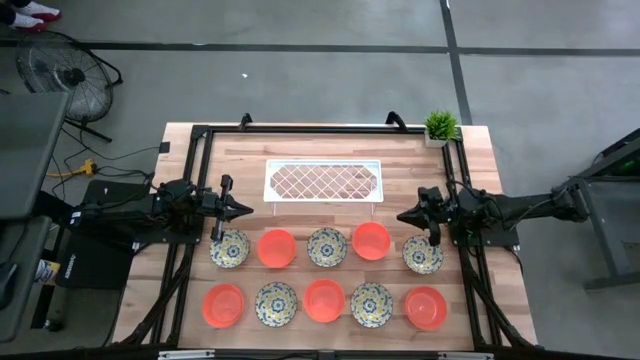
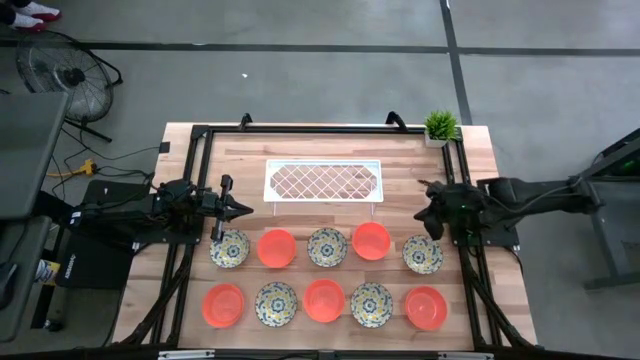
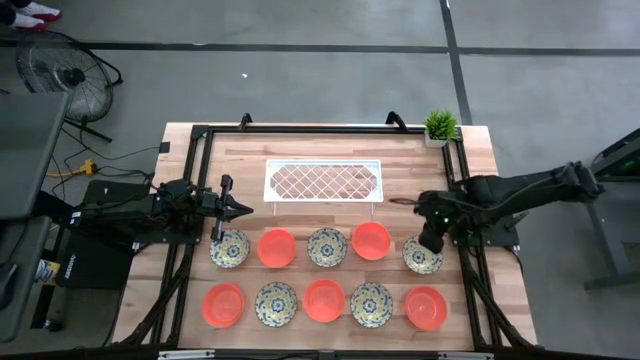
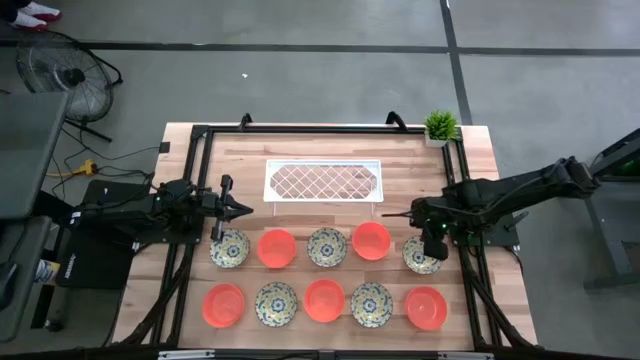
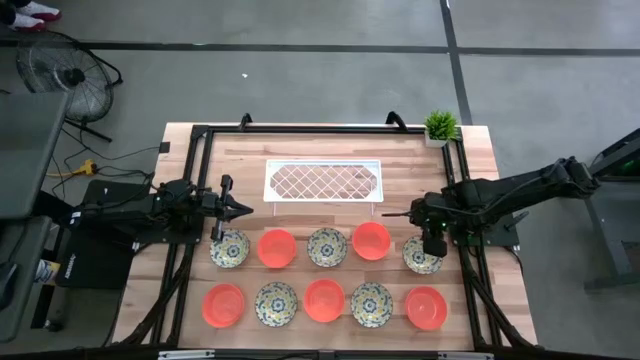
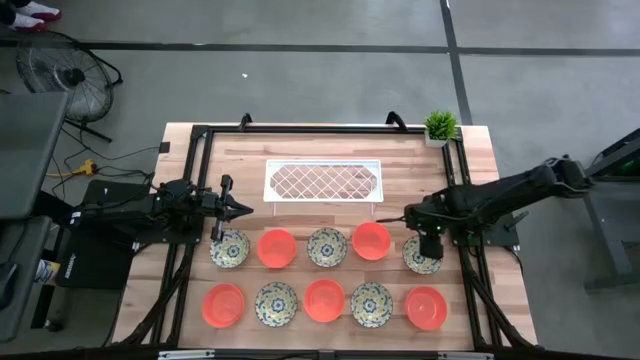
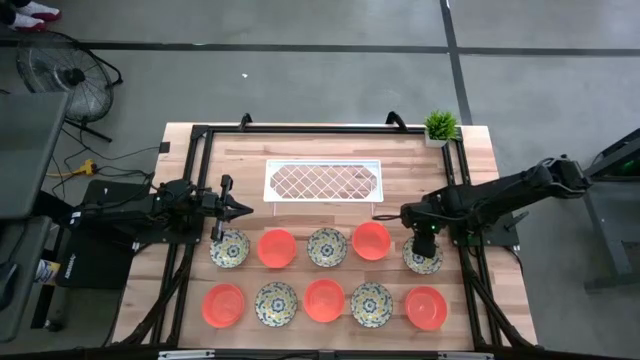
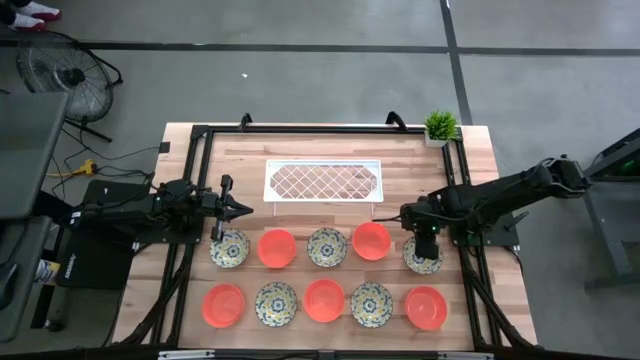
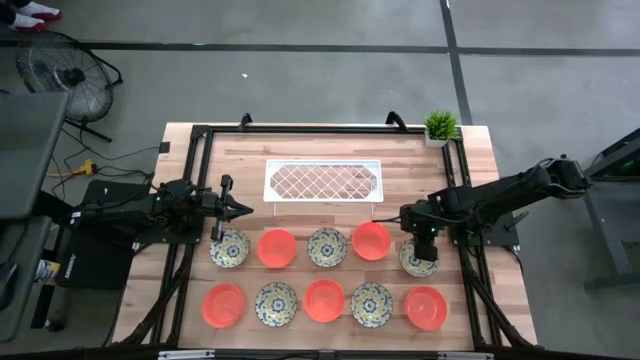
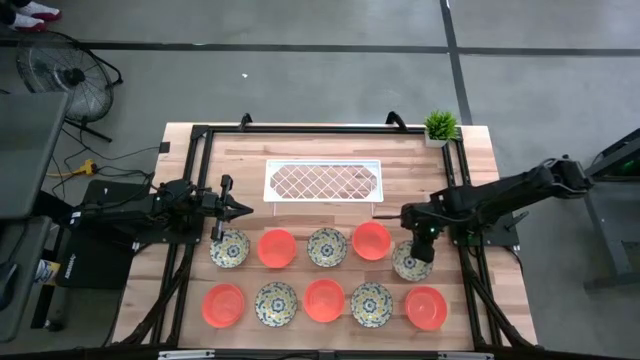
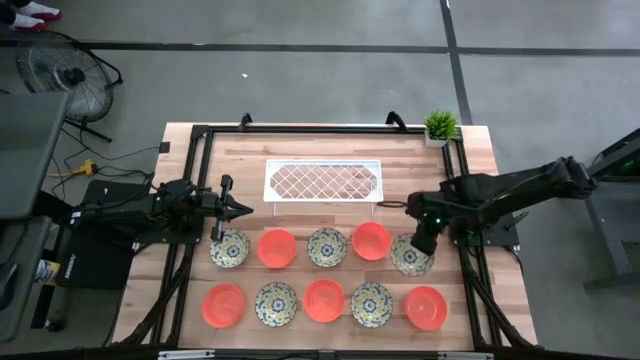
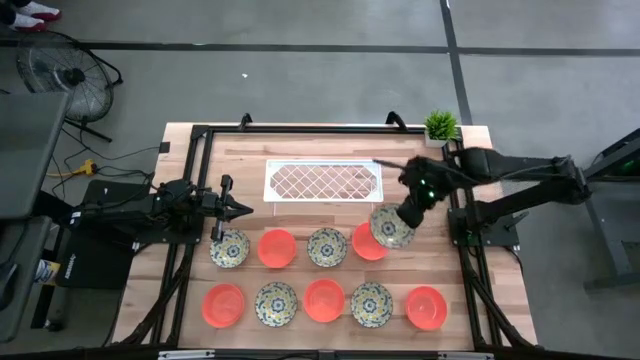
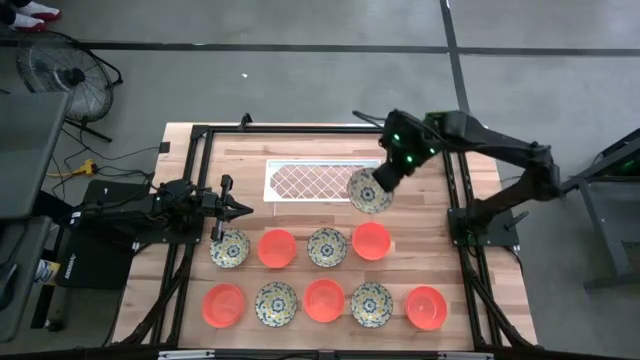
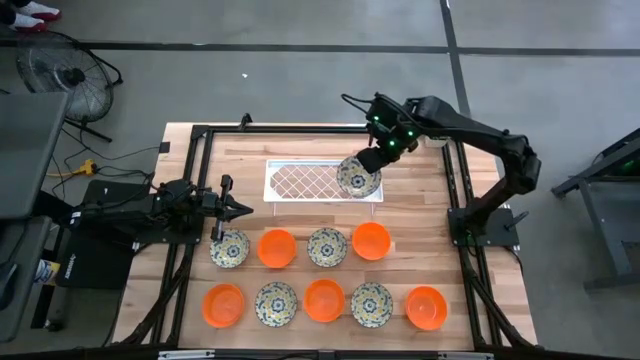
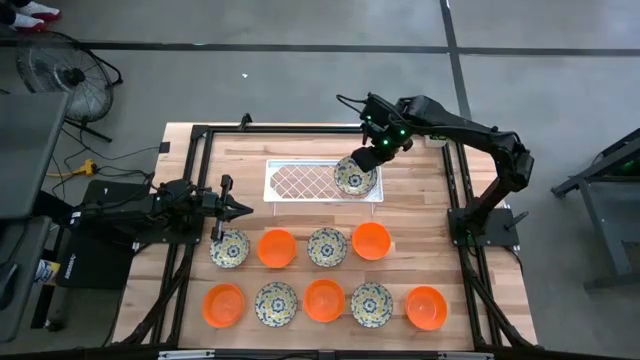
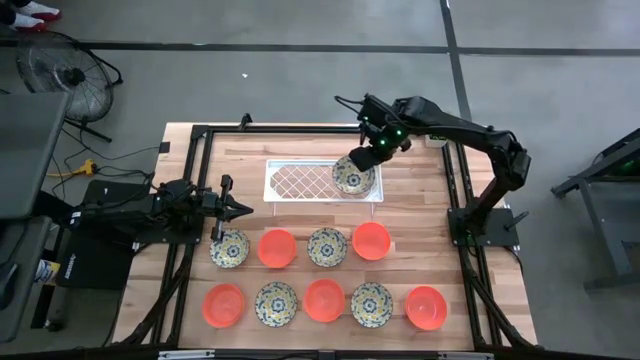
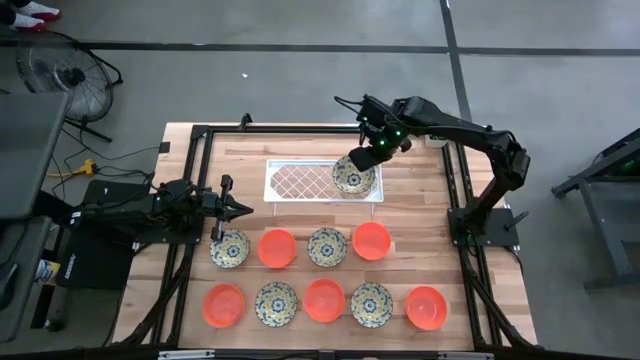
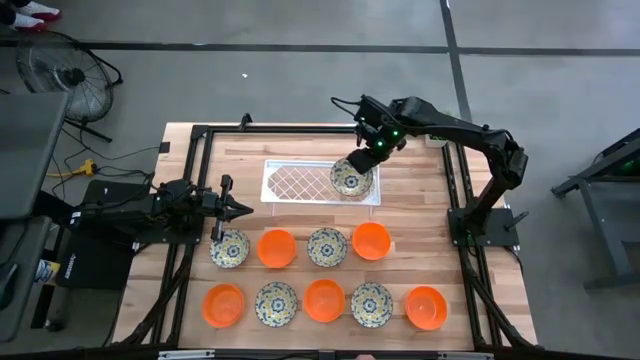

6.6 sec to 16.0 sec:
Task: Pick & Place Mini bowls
Put the yellow patterned bowl on the shelf

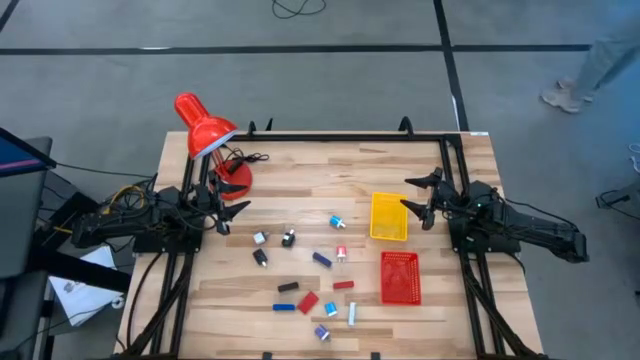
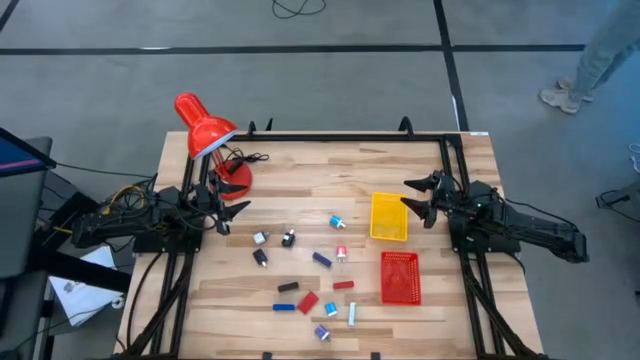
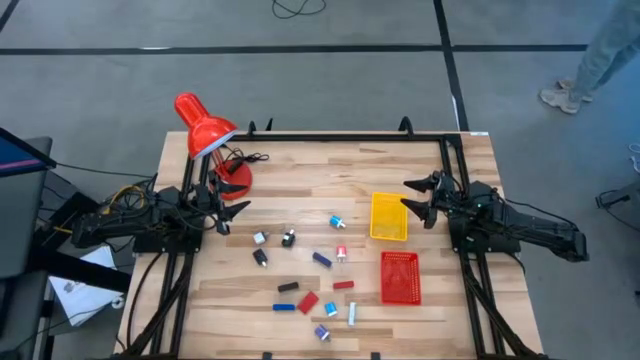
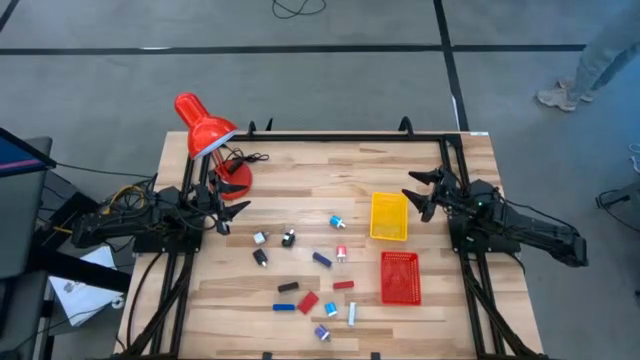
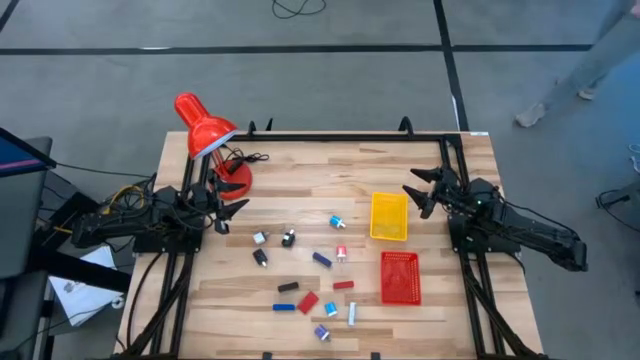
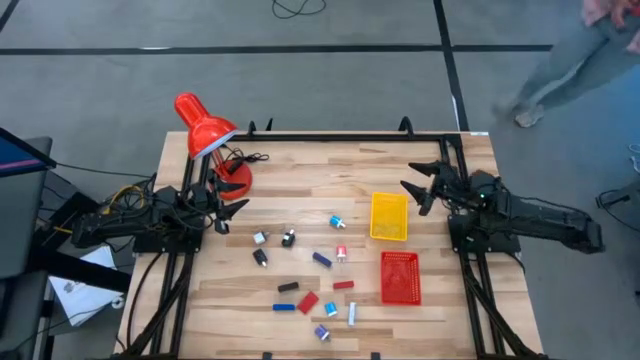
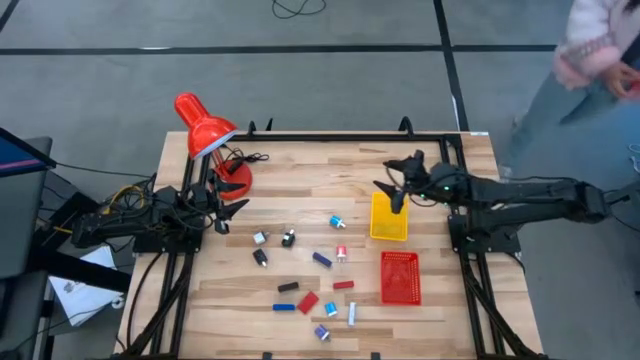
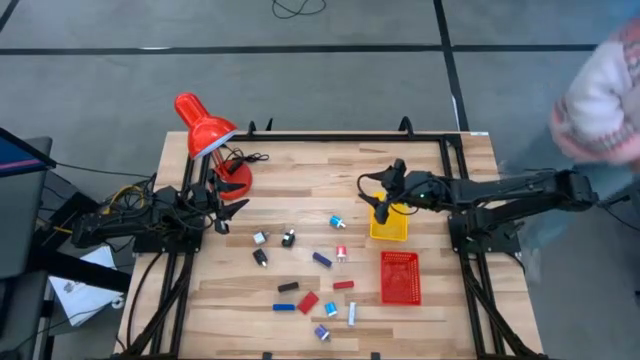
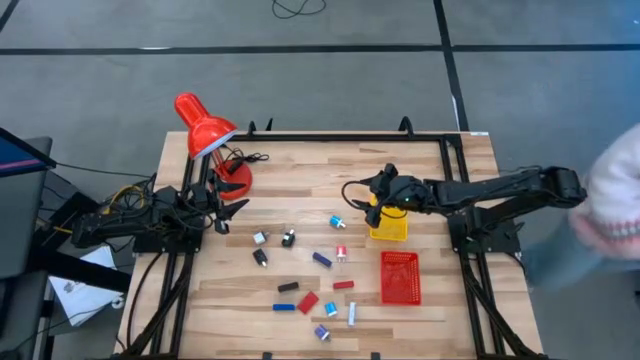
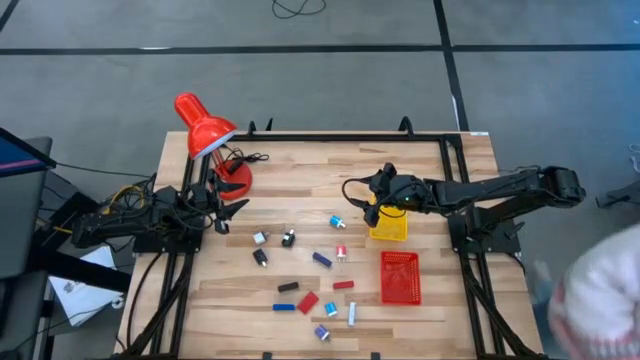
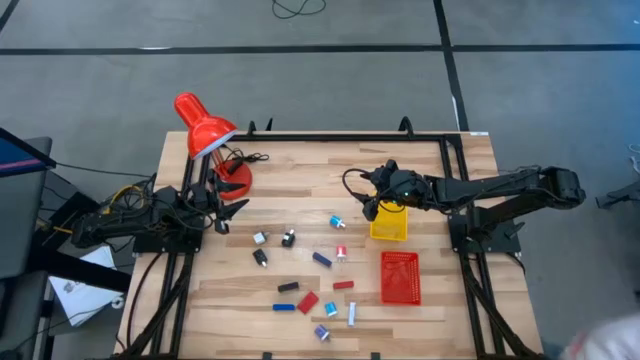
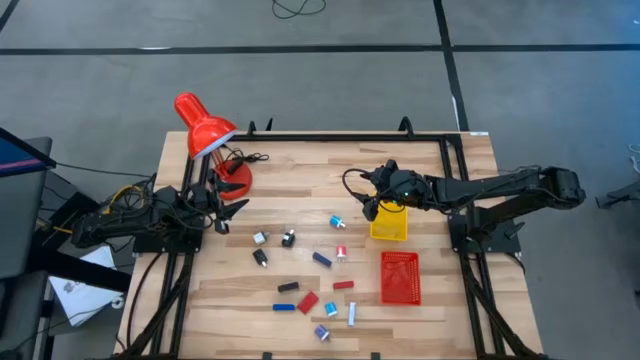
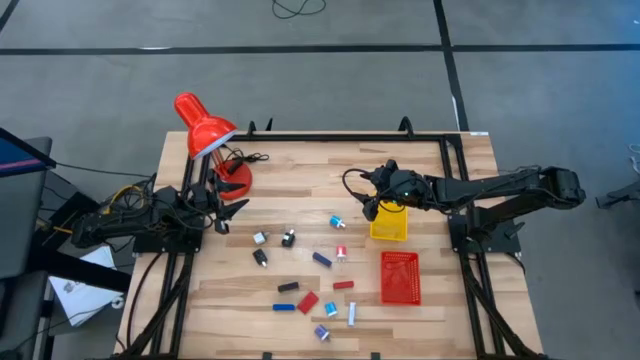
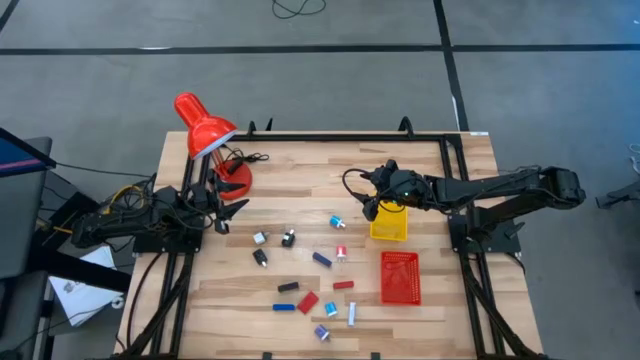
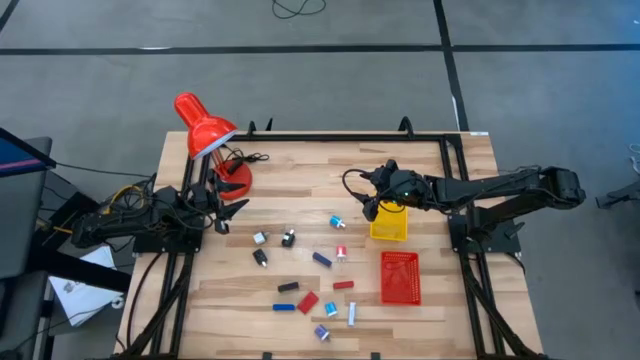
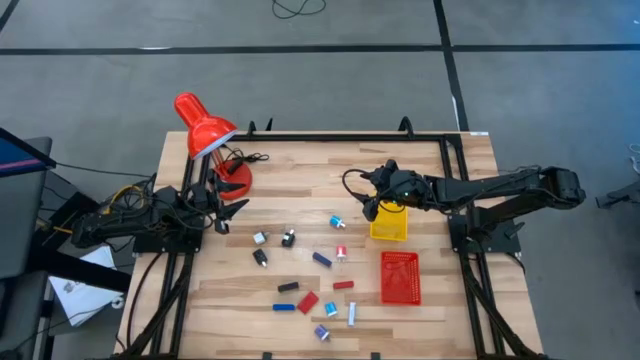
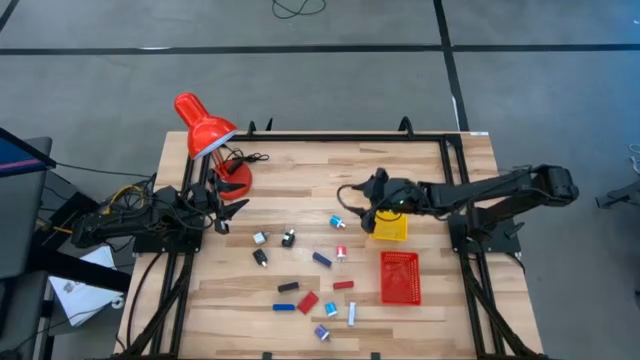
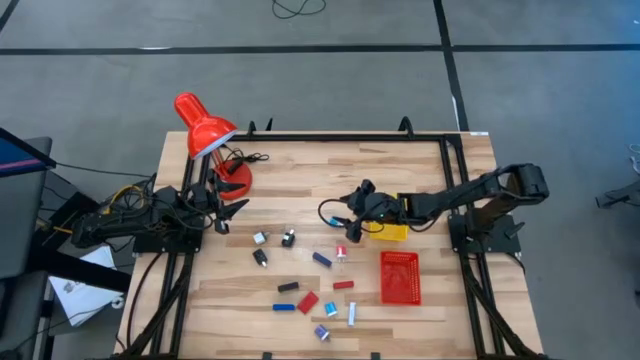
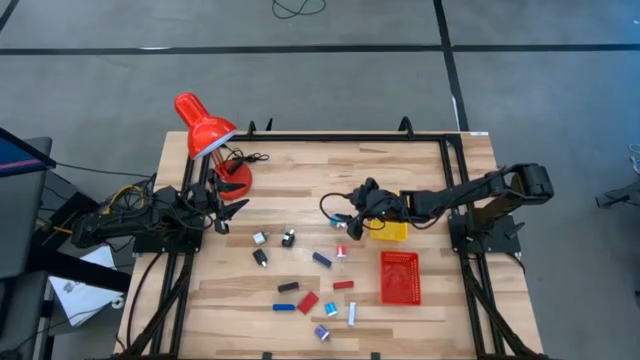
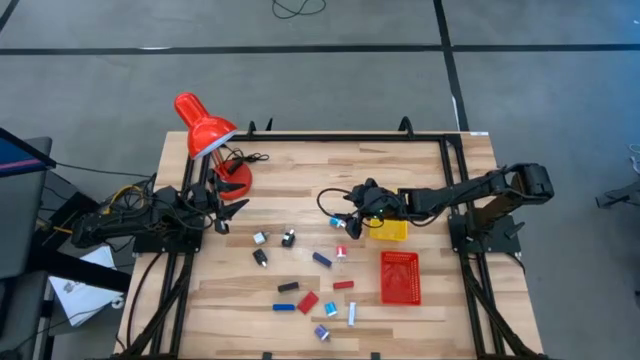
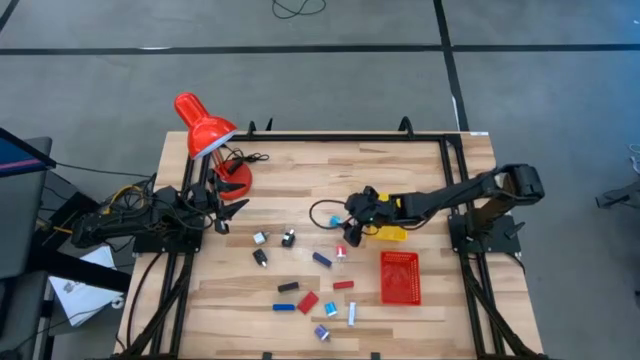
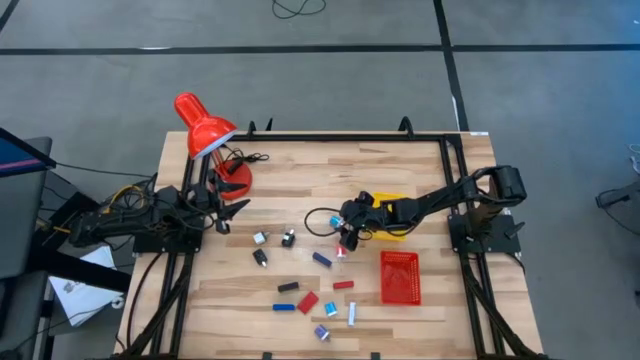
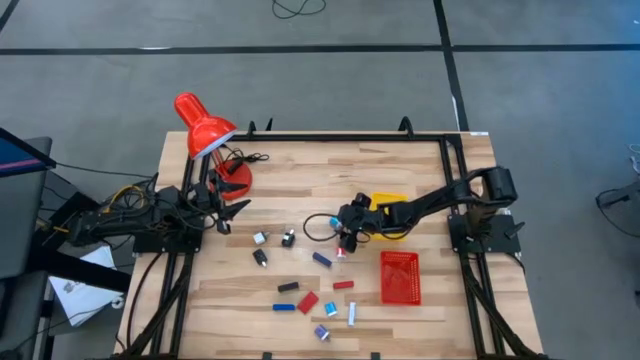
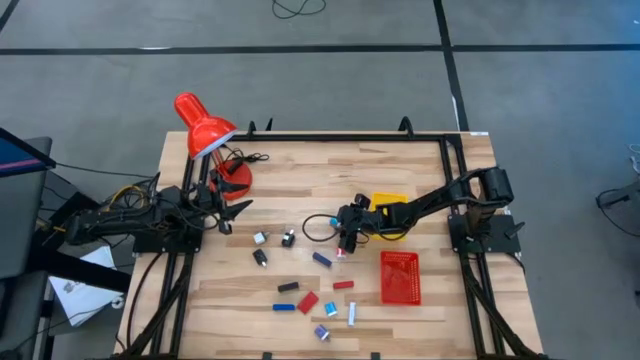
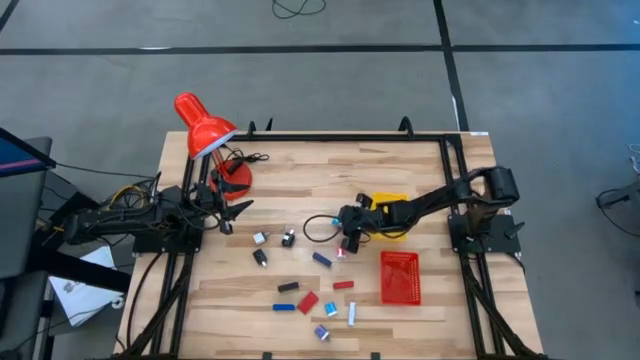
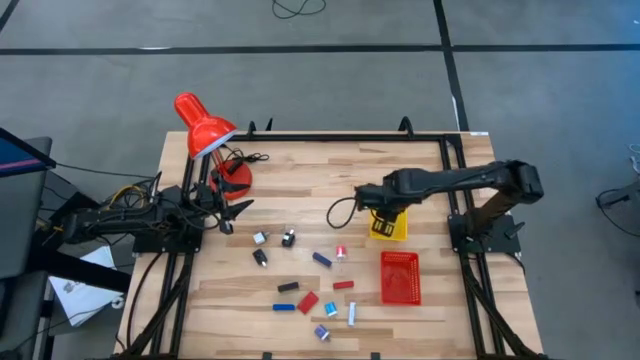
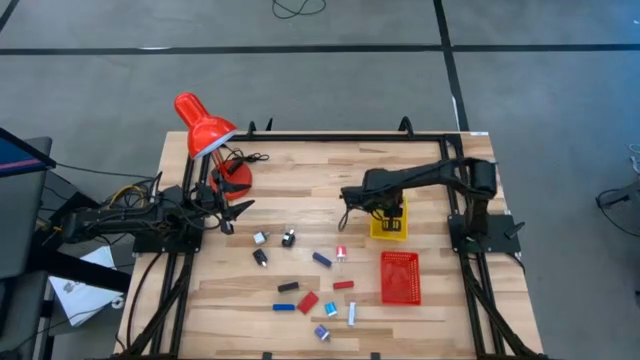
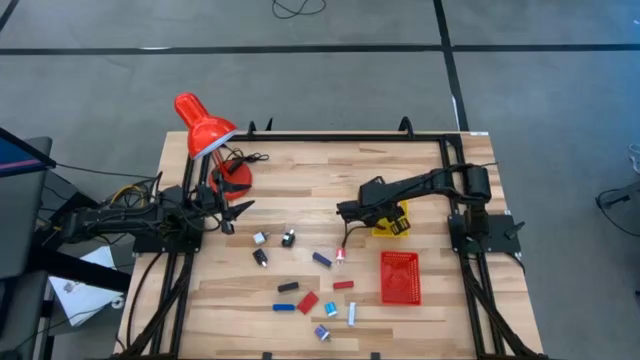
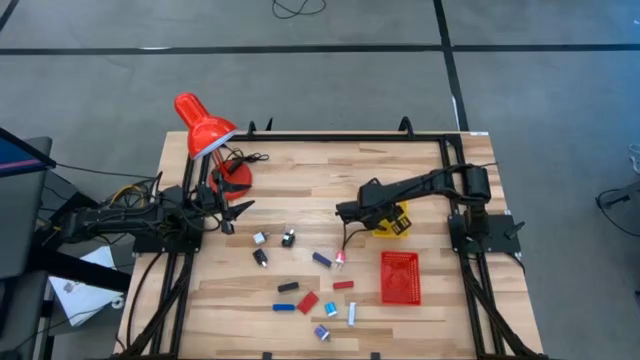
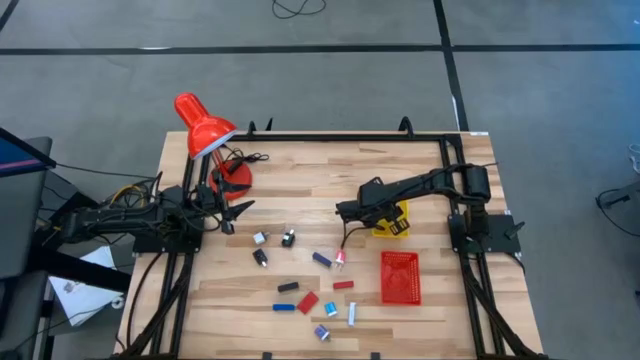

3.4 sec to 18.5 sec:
Task: Pick & Place Office items
Put the top blue charger adapter into the yellow bin
